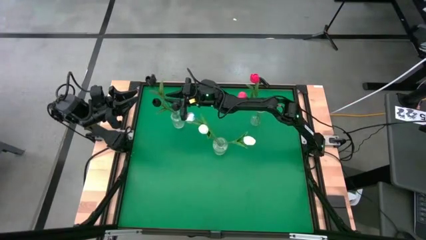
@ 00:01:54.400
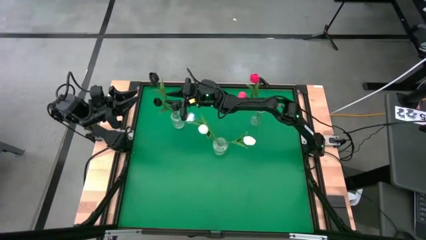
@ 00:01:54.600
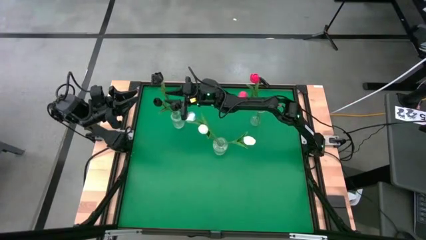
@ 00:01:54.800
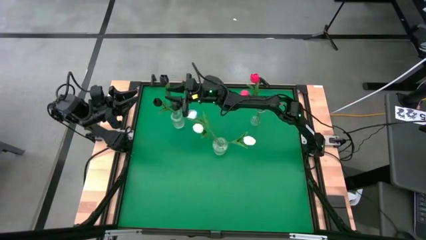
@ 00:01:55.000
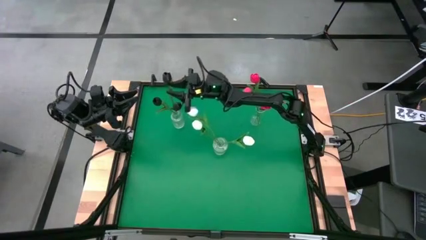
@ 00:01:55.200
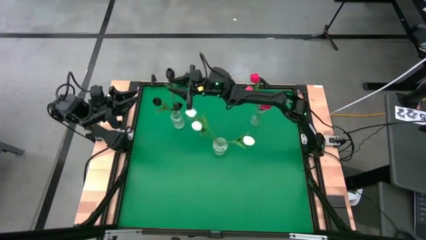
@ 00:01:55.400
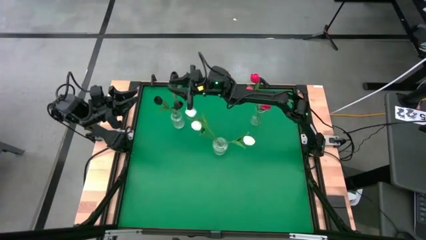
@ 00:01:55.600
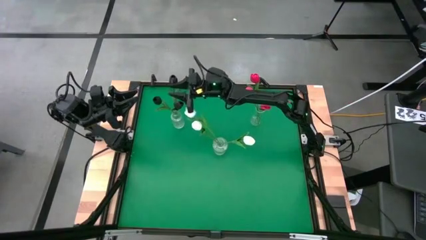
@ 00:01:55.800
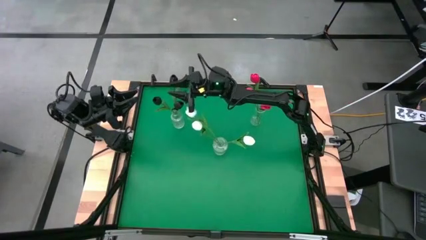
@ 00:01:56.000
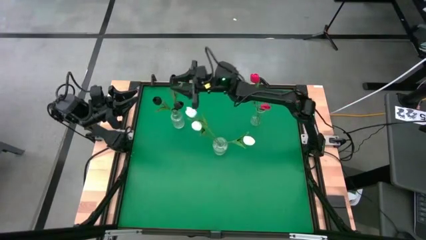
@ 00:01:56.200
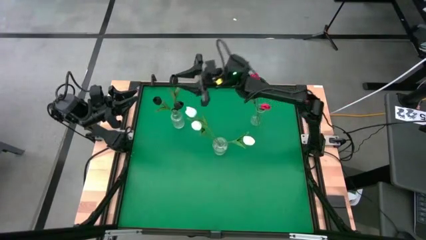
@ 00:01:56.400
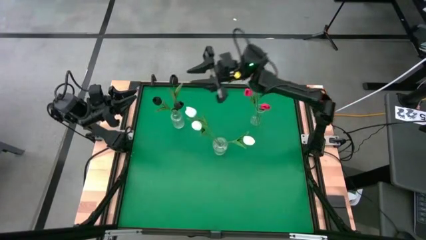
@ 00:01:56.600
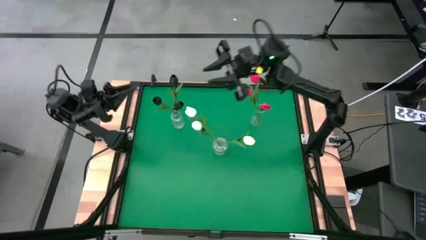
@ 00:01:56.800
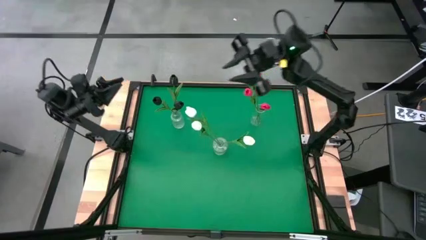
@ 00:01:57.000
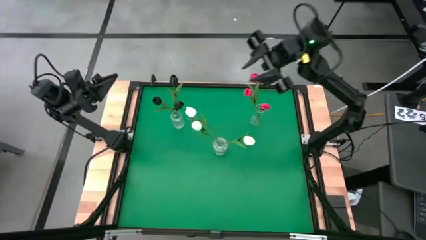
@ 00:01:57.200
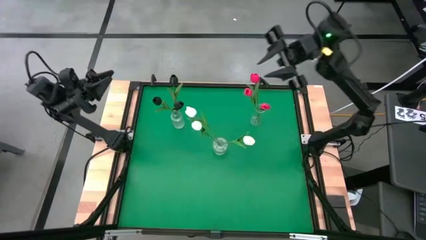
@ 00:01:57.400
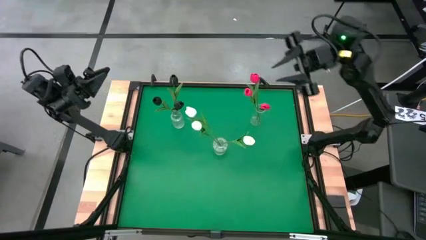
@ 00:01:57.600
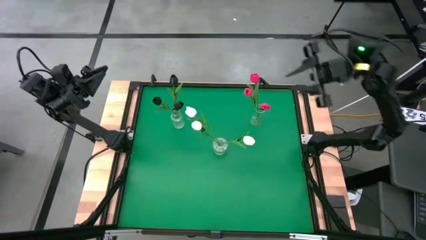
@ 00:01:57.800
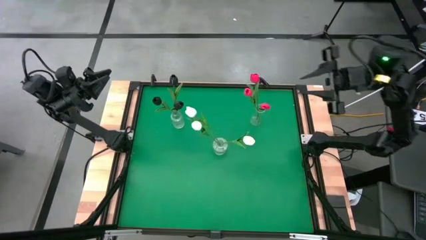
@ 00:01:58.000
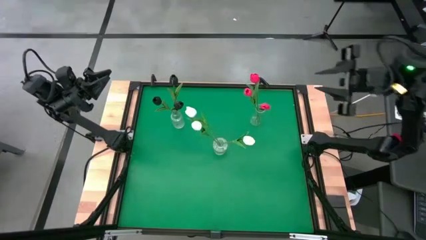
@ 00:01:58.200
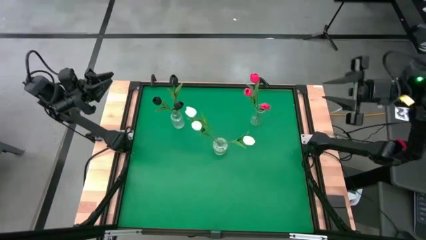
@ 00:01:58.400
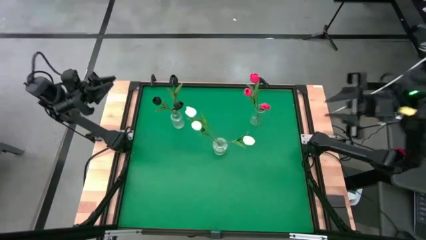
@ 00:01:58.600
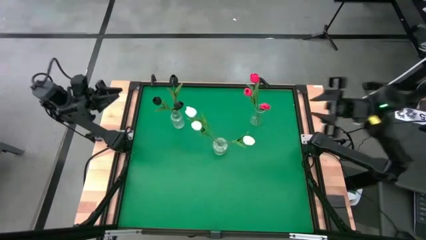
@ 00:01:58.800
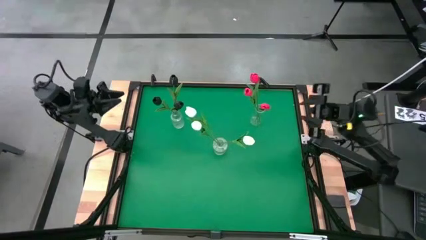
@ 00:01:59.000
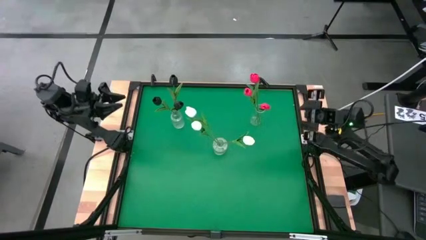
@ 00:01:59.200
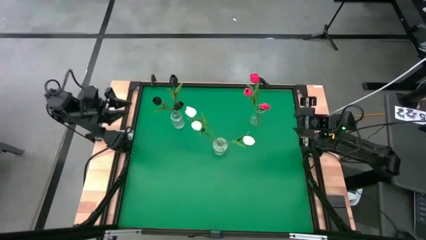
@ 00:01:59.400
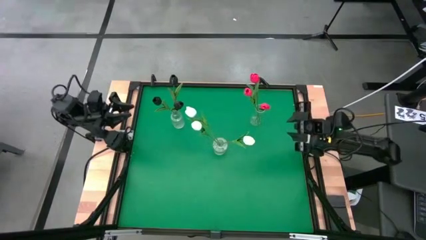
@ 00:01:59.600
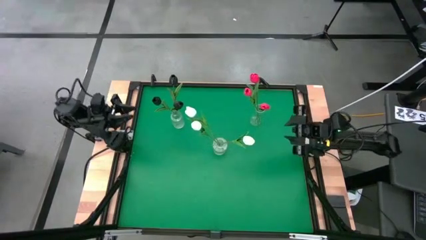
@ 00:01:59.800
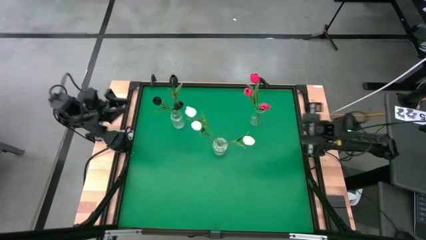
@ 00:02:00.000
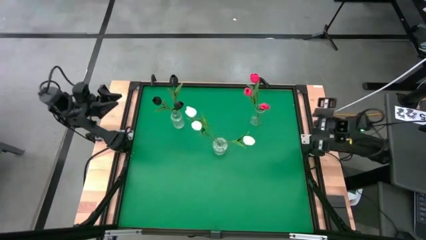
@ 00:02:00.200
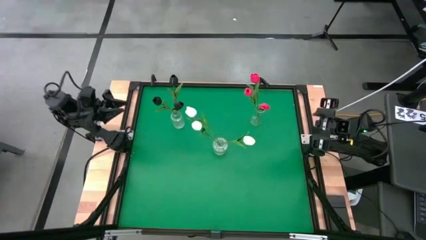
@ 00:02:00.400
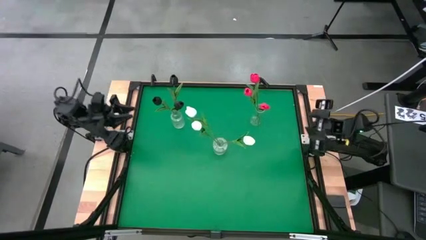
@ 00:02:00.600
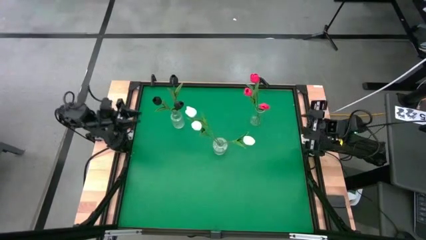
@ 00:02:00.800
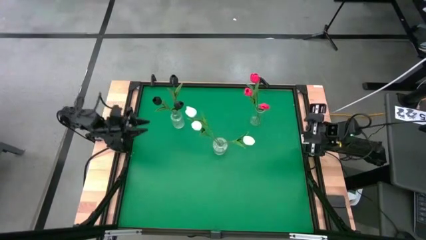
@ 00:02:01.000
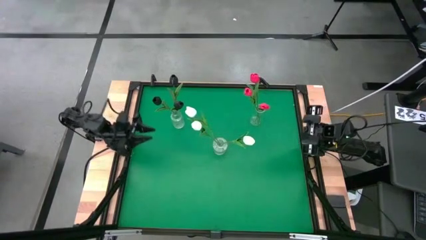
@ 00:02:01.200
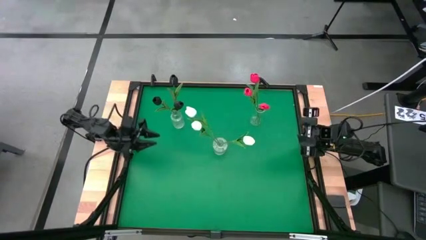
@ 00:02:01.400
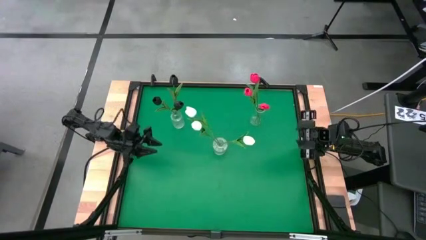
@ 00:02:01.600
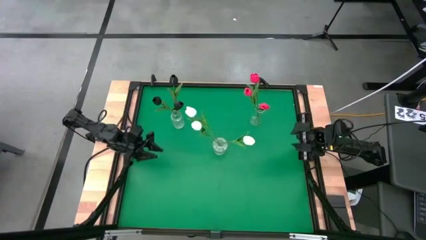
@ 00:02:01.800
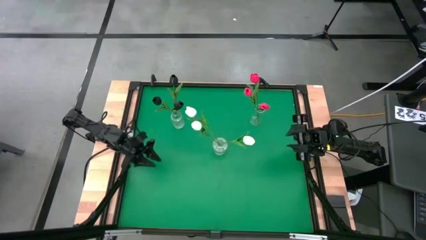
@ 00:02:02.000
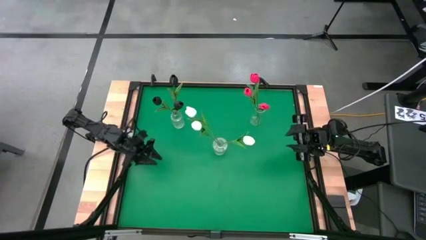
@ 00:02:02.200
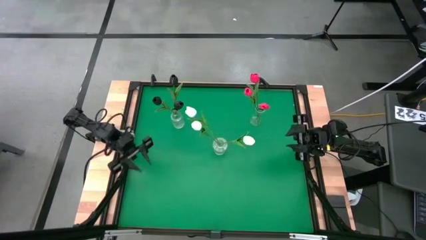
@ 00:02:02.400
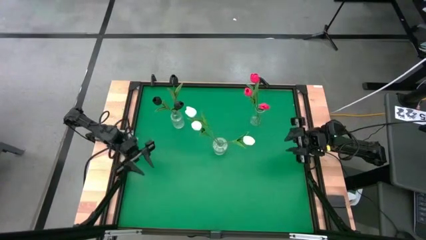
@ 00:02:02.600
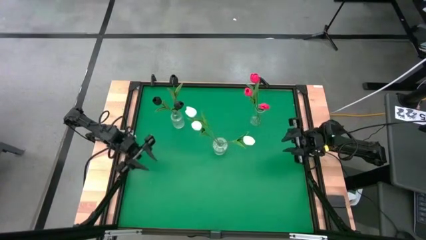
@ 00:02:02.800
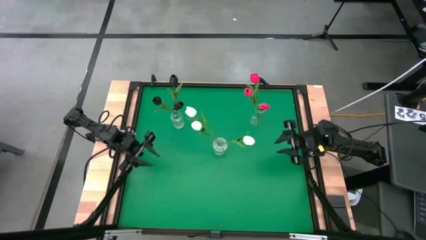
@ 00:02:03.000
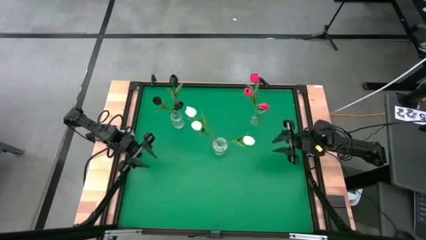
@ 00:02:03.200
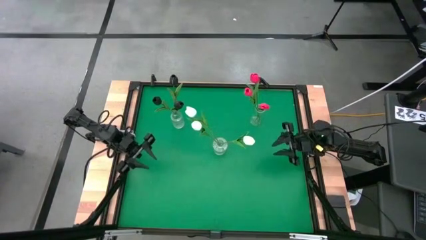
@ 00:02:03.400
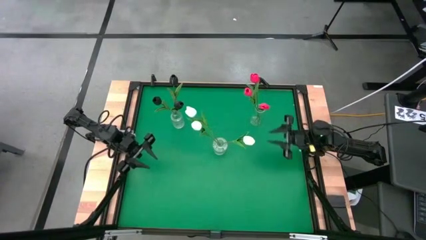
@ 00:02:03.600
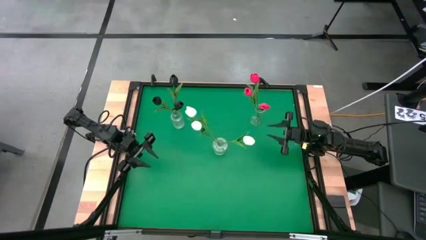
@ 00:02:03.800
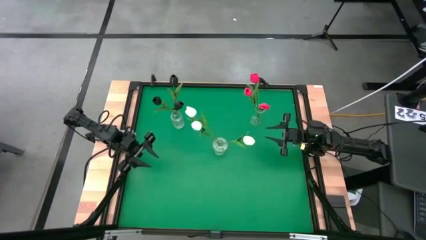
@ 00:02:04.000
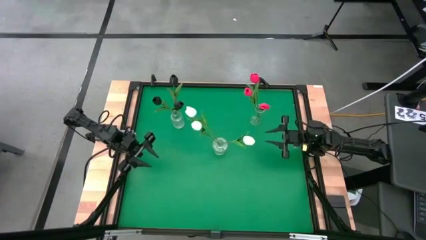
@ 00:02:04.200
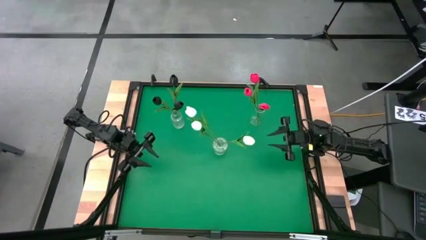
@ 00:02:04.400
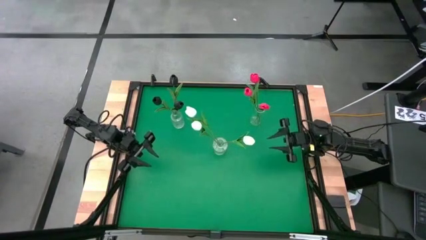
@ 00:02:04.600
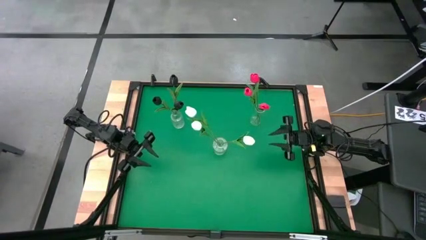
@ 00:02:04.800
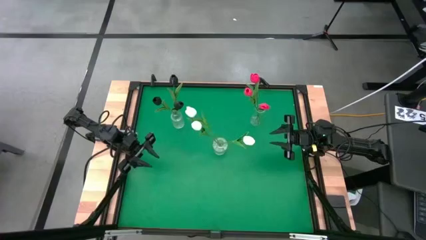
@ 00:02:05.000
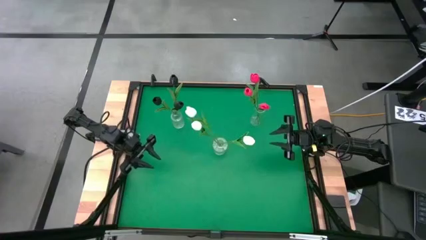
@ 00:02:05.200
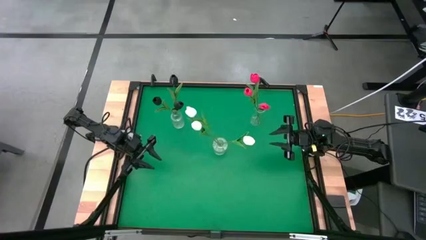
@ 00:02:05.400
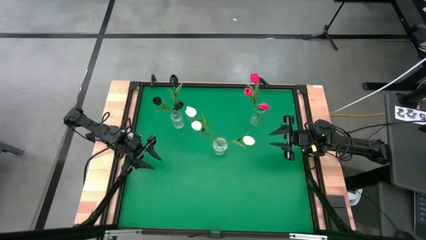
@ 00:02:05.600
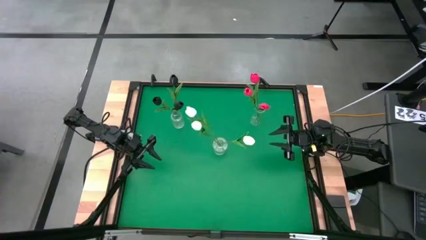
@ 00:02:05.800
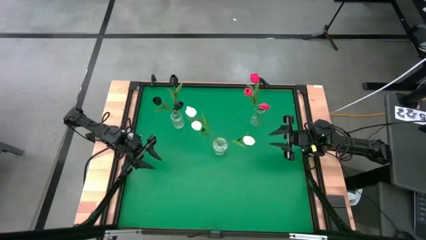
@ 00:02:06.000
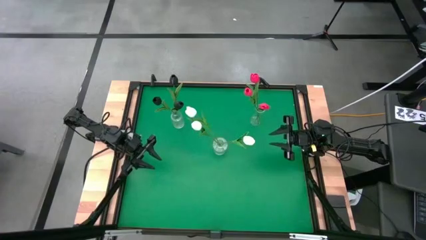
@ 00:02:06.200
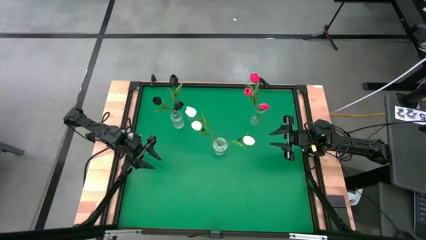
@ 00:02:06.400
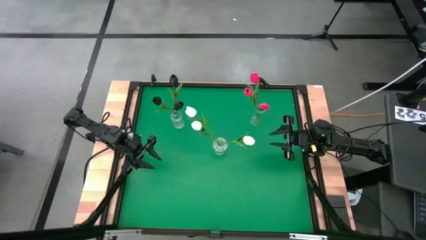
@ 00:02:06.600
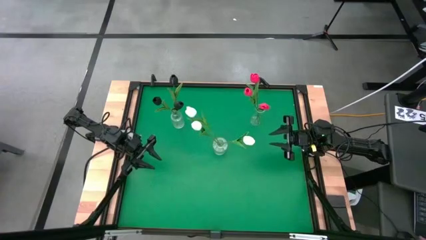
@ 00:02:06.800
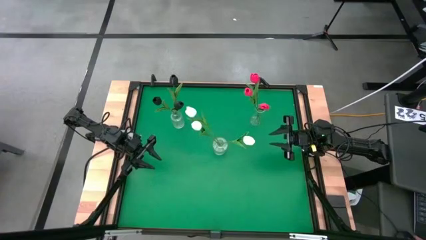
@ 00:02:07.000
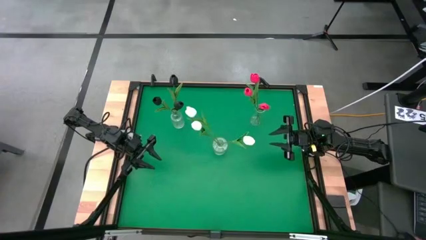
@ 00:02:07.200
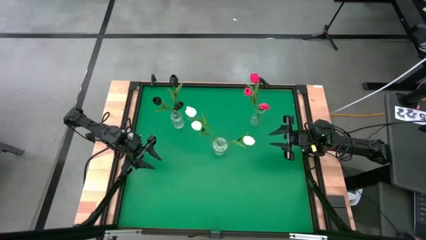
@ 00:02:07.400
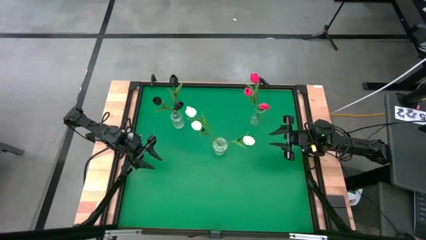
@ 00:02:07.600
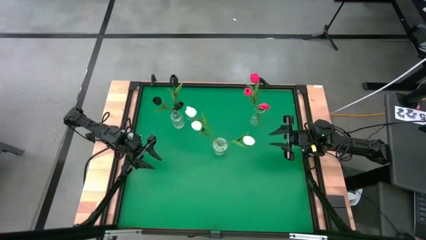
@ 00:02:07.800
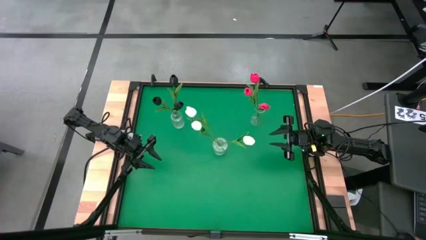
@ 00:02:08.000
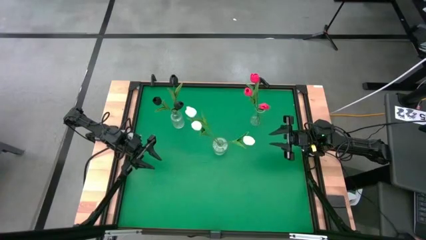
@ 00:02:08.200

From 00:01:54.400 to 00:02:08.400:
Task: Sort flowers into vase by color
Return to Home Position
